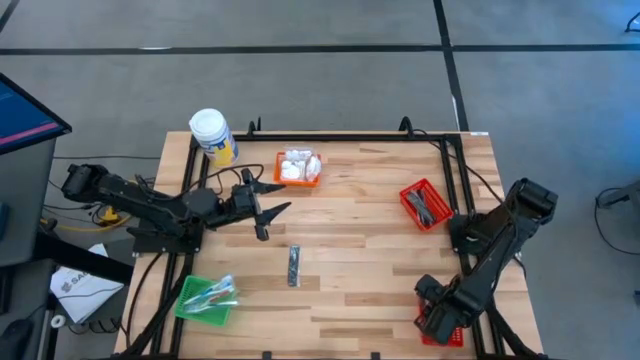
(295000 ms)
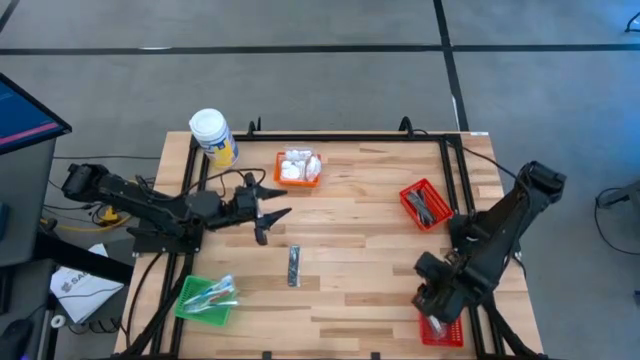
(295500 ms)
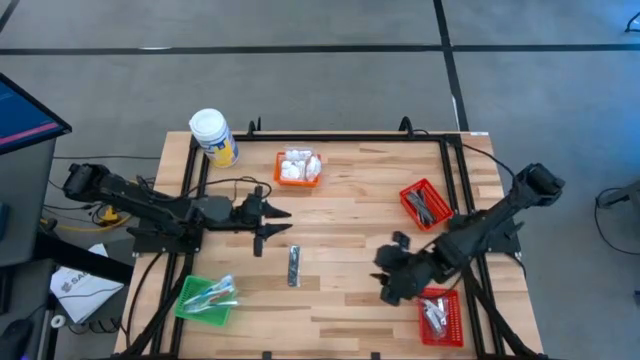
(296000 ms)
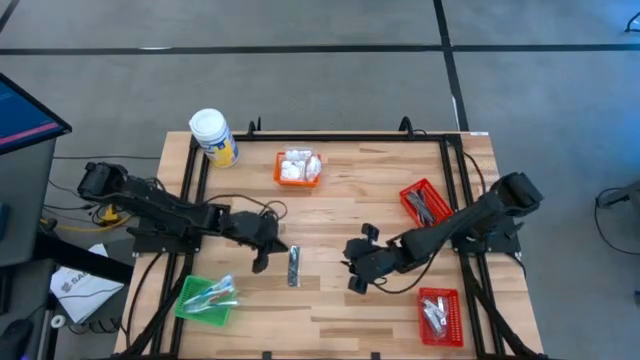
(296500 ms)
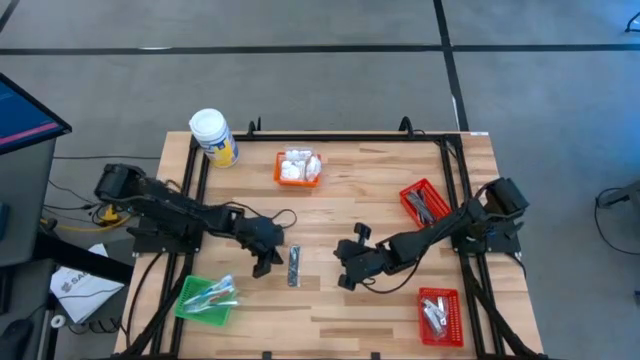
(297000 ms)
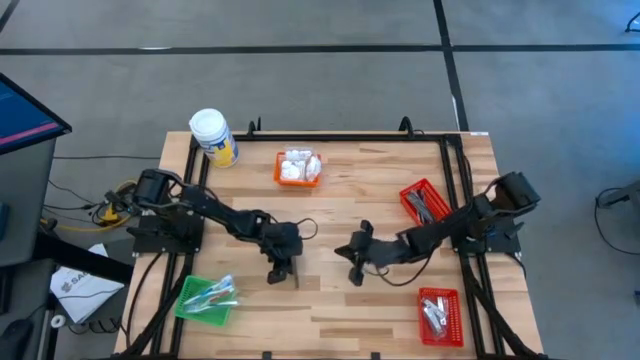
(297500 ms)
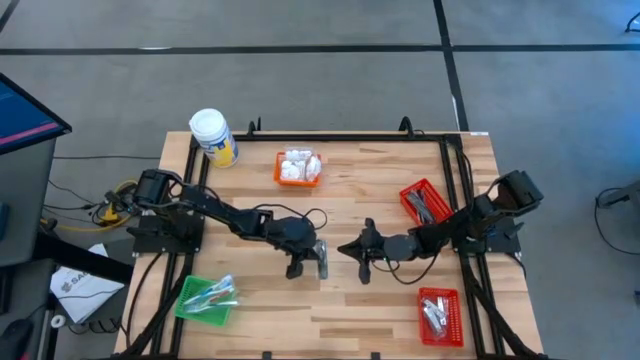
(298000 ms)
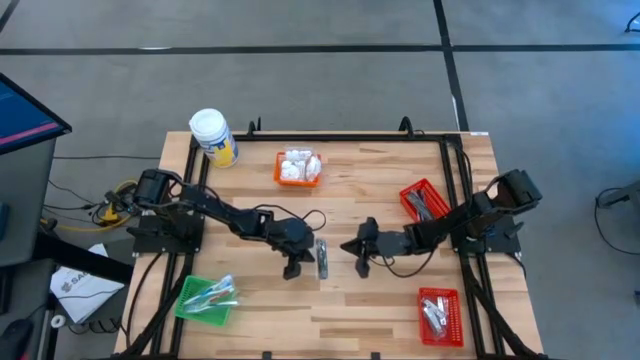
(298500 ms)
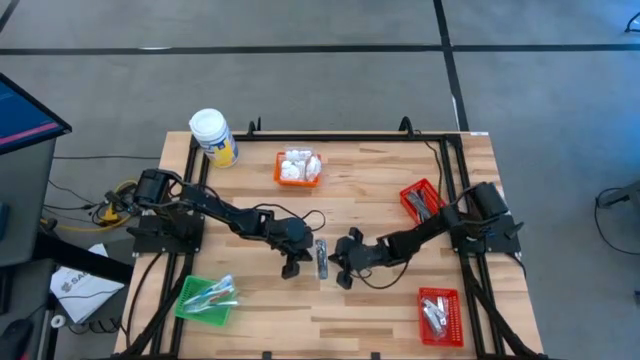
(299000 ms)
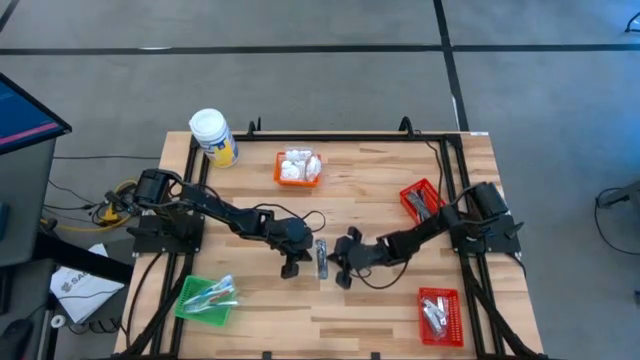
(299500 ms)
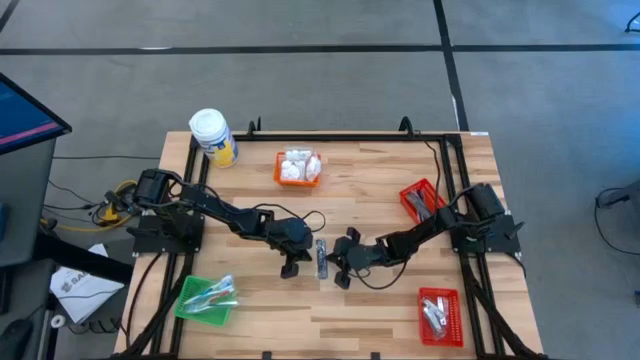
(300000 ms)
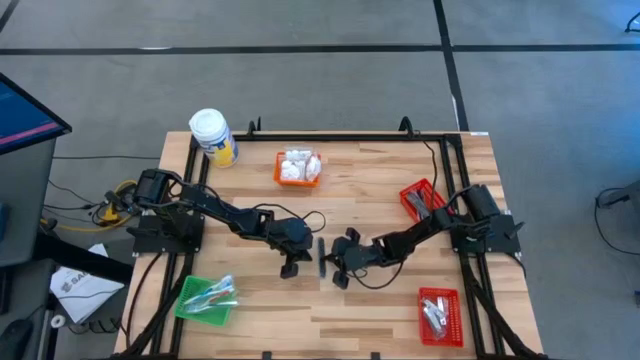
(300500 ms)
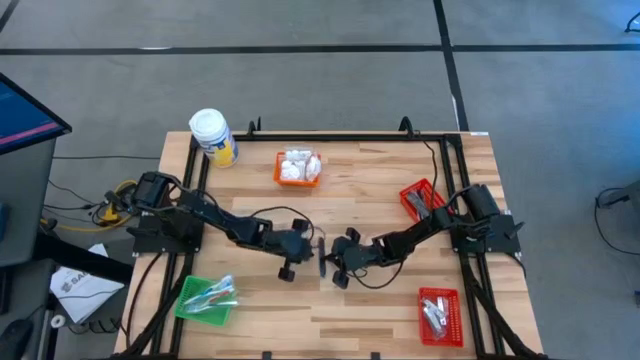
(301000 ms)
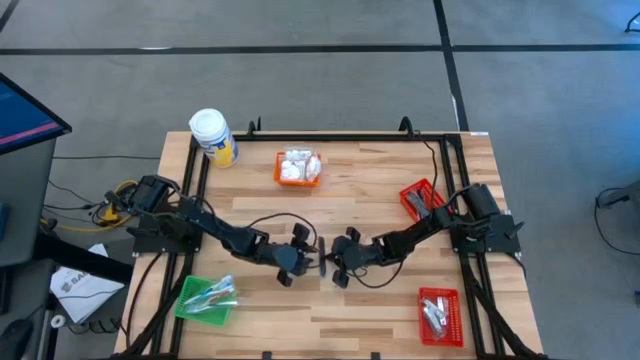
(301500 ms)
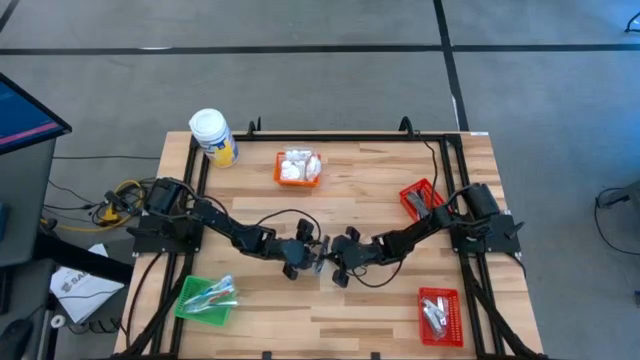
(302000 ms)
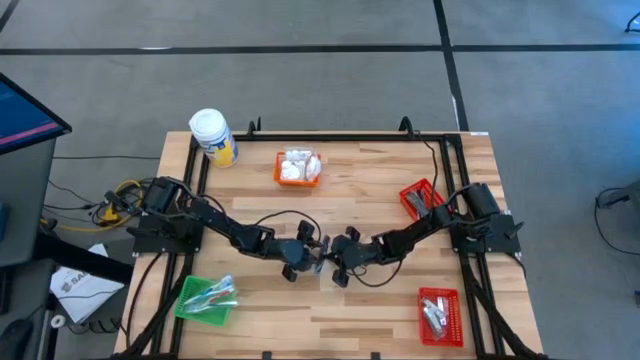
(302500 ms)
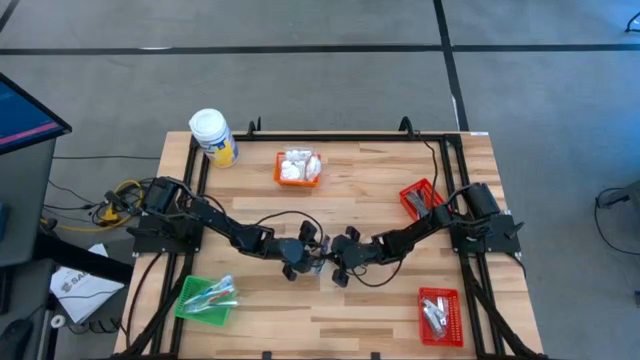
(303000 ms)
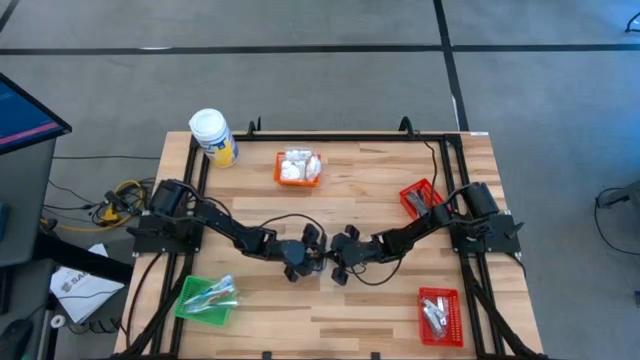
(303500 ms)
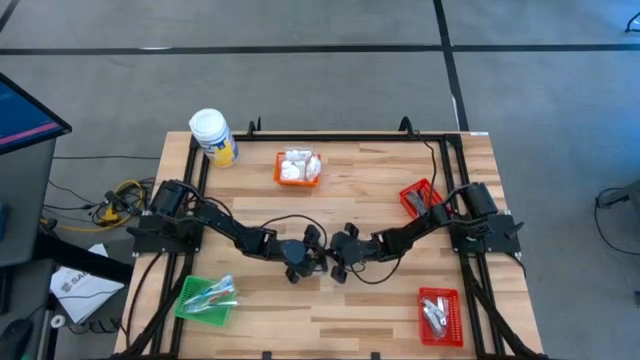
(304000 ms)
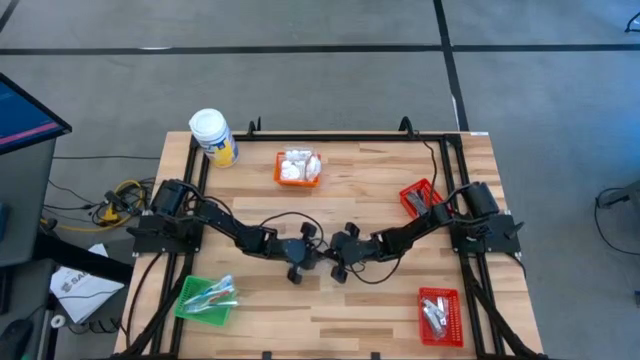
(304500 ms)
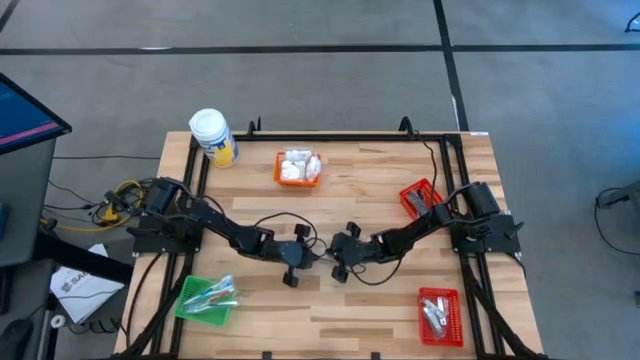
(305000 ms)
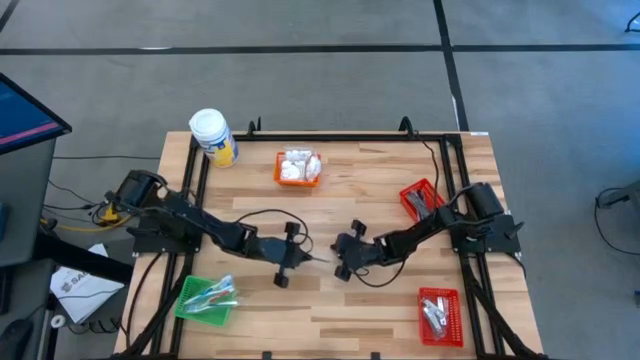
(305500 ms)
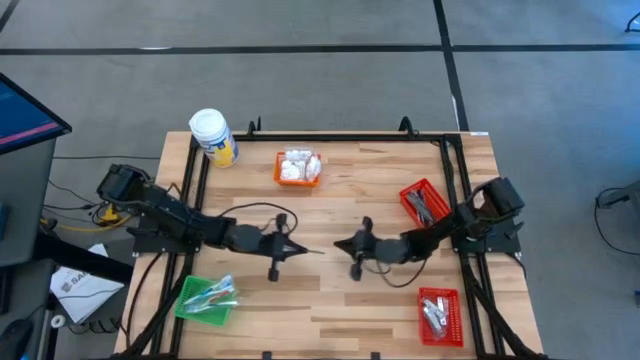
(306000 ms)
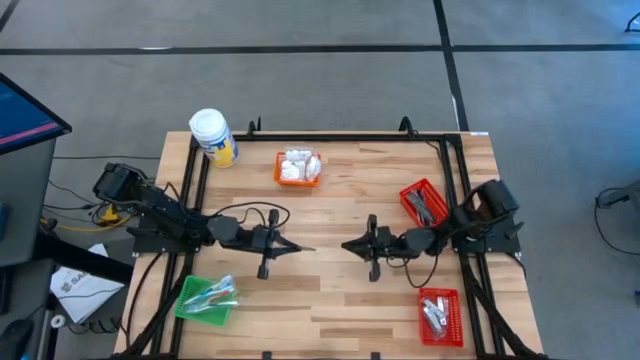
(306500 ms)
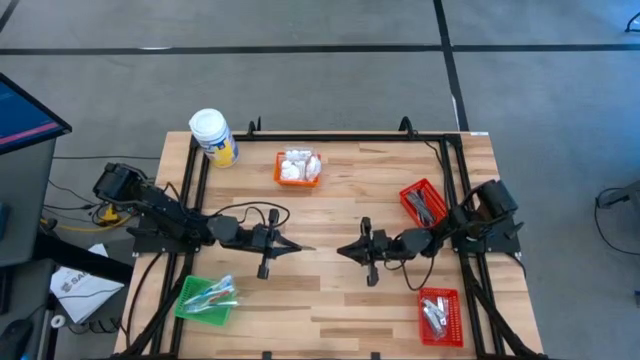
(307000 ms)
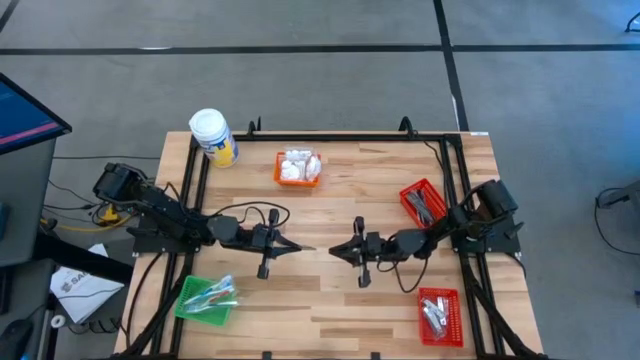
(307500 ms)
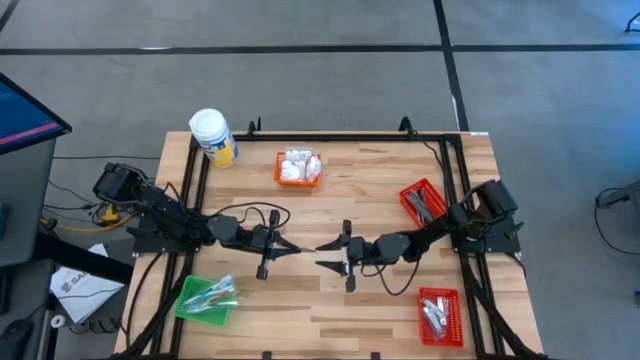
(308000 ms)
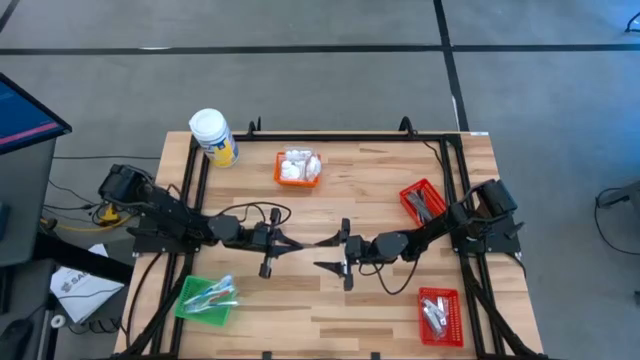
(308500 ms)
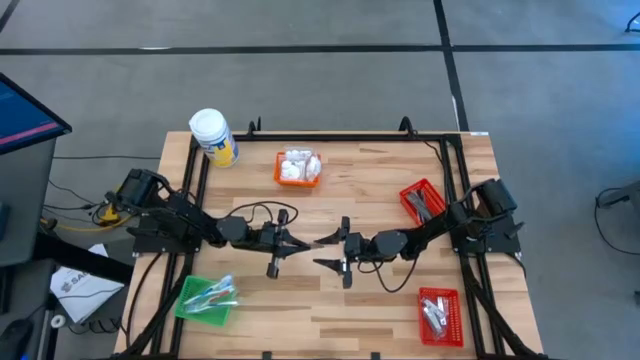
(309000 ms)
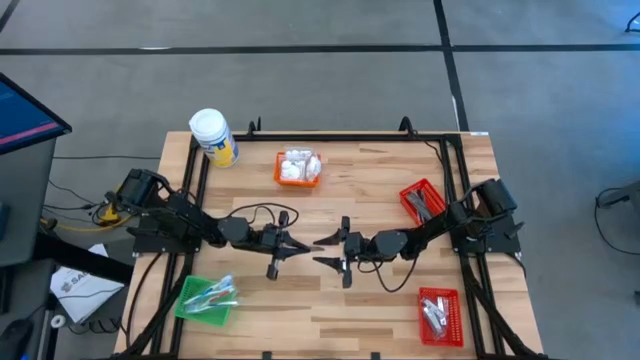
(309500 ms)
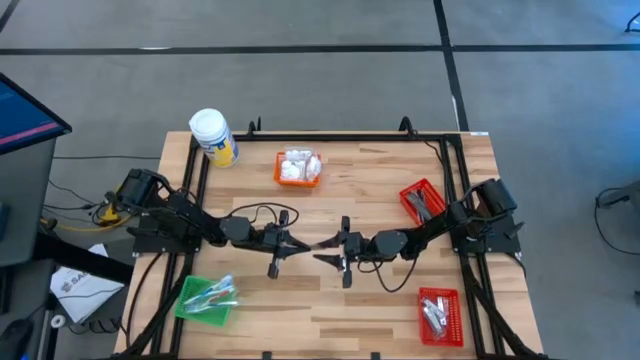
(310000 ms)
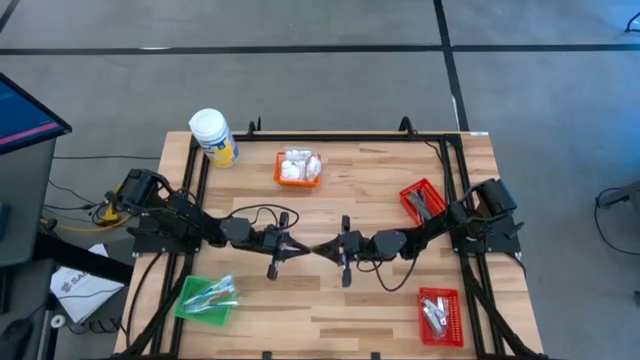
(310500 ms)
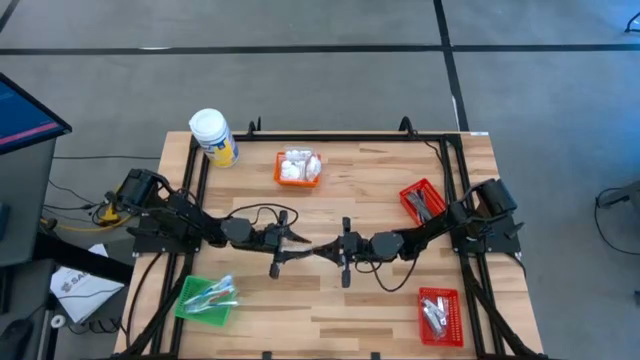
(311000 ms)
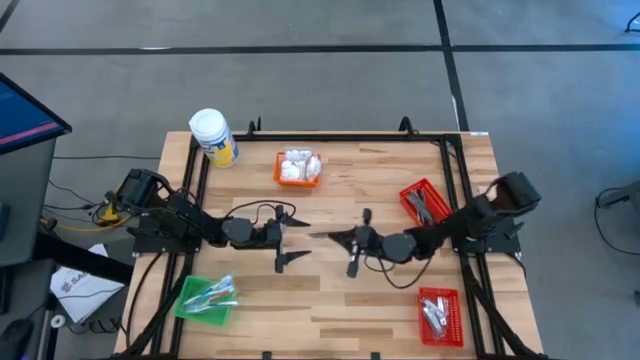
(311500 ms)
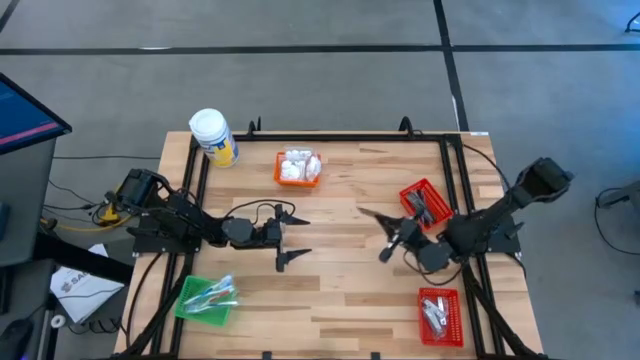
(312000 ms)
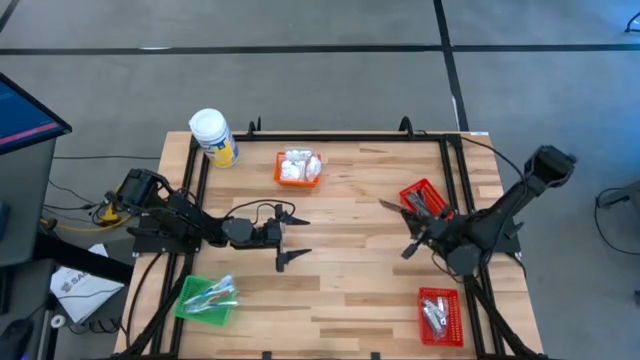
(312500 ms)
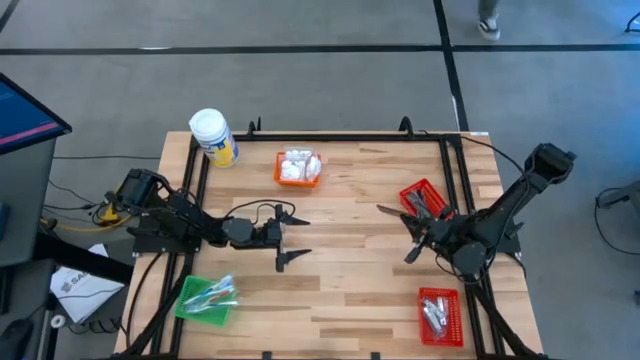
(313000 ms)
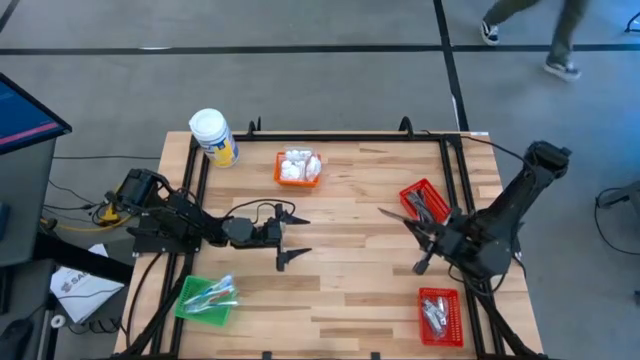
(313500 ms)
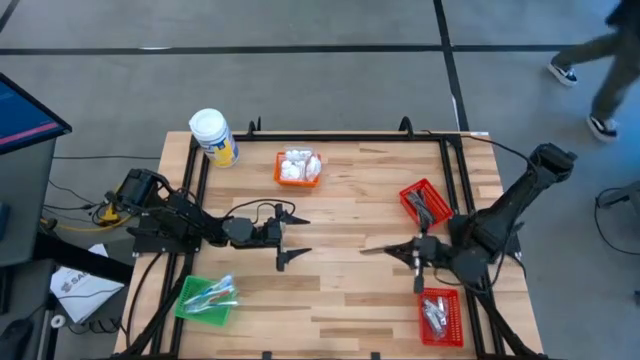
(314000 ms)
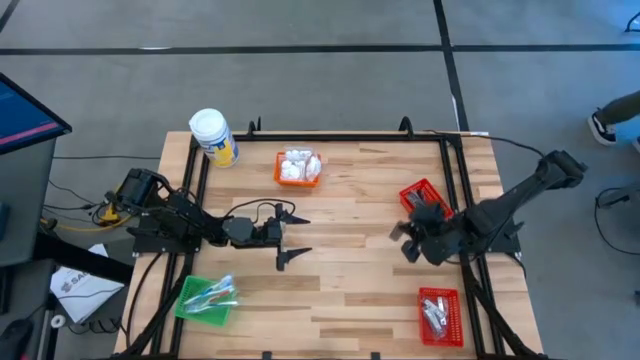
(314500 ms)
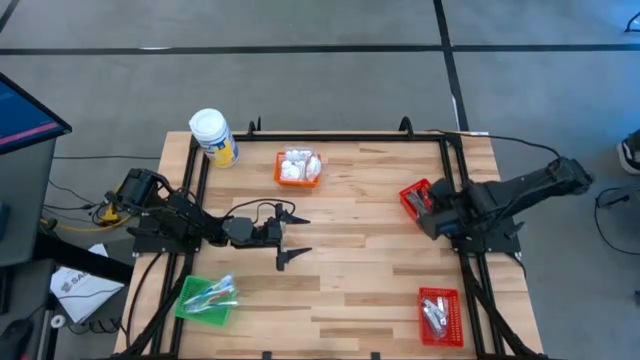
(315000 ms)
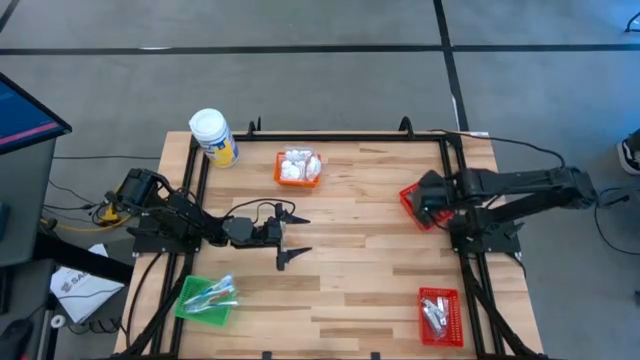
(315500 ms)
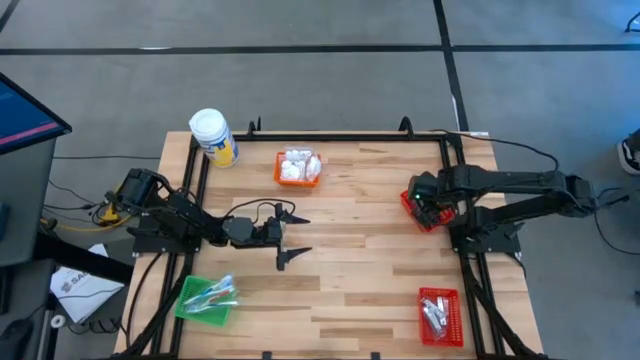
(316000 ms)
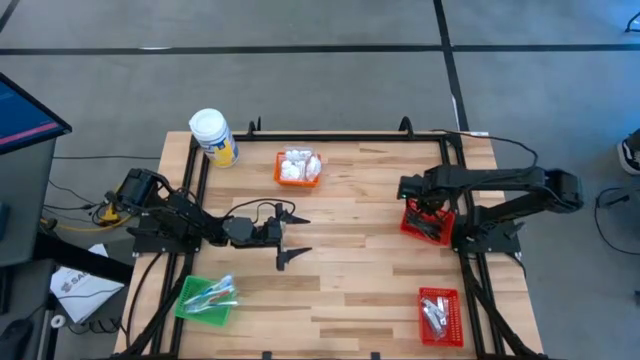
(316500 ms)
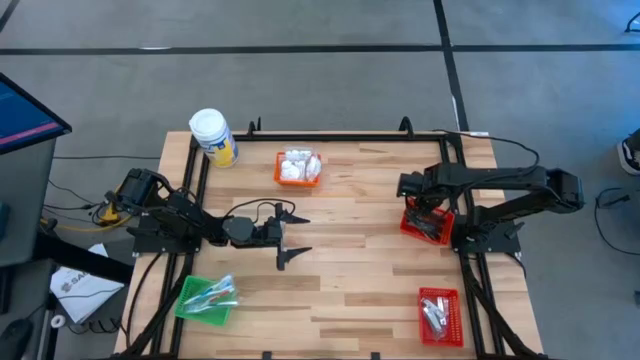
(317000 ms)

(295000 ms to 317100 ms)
Task: Pick & Place Travel size toiletries
Put the black comb into the top red basket
